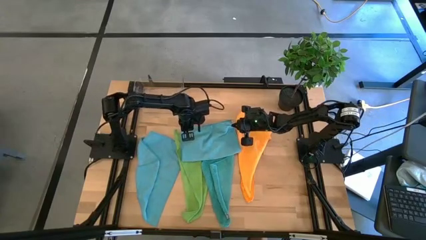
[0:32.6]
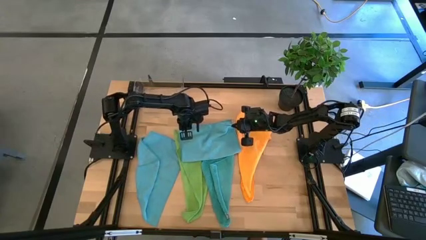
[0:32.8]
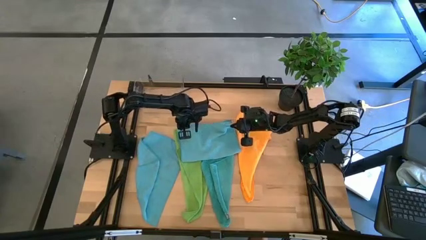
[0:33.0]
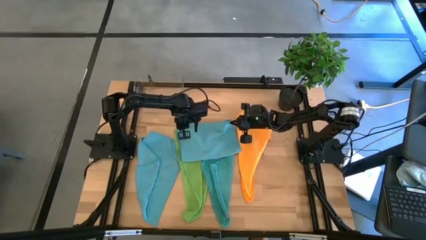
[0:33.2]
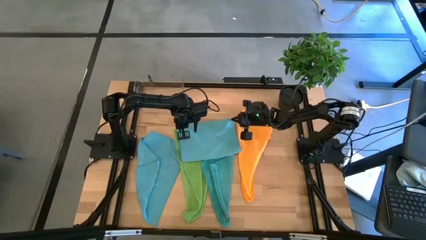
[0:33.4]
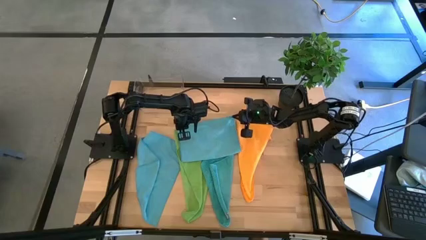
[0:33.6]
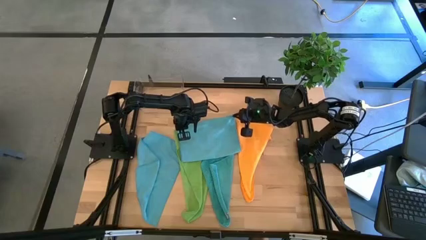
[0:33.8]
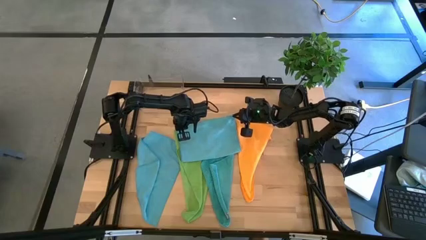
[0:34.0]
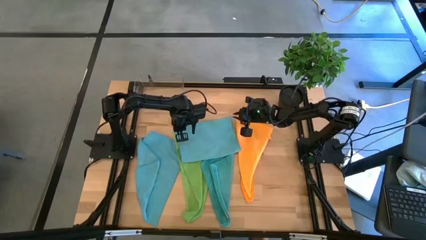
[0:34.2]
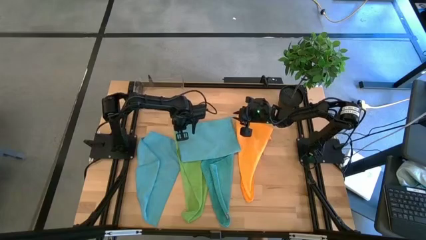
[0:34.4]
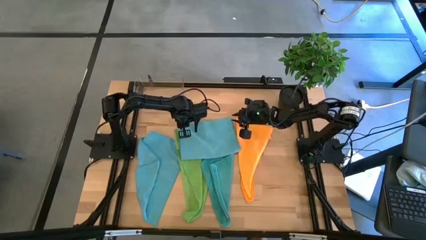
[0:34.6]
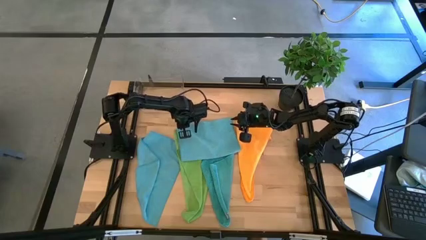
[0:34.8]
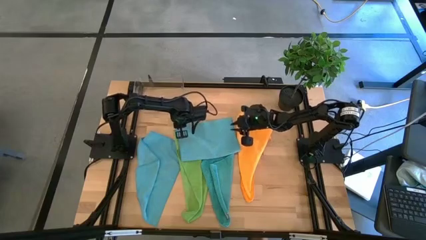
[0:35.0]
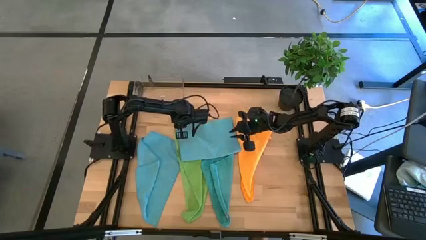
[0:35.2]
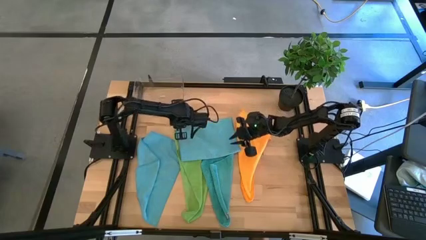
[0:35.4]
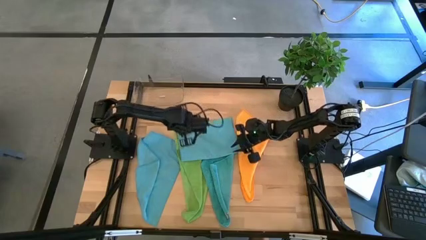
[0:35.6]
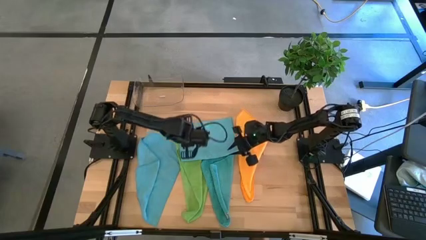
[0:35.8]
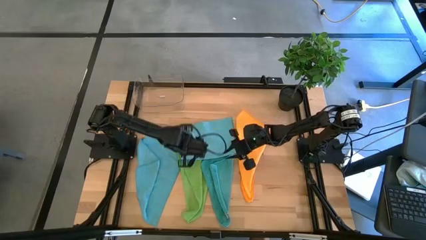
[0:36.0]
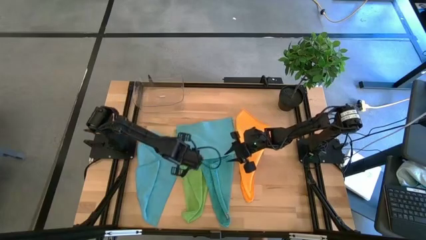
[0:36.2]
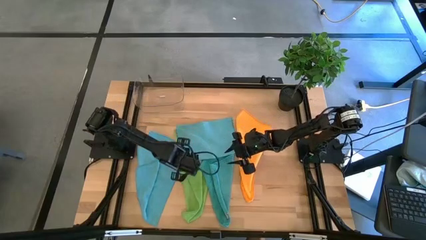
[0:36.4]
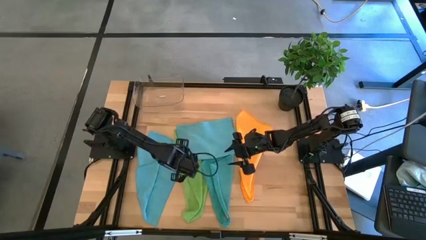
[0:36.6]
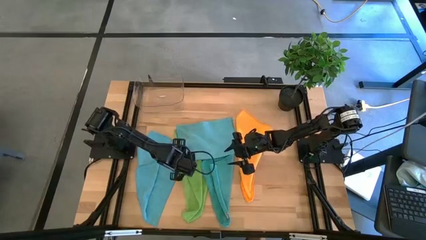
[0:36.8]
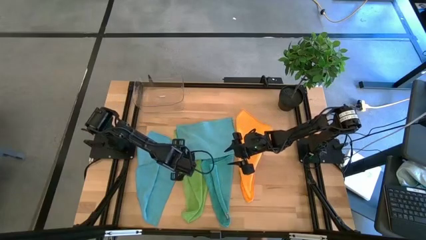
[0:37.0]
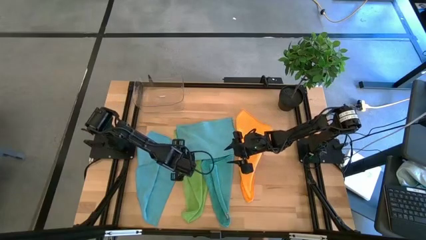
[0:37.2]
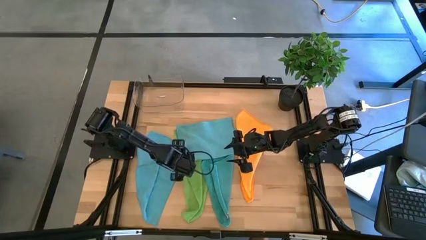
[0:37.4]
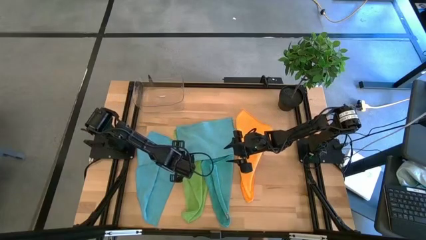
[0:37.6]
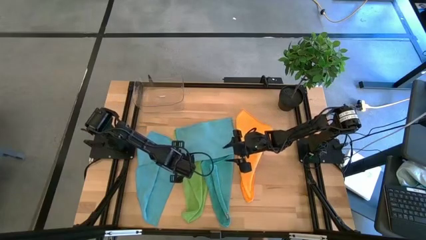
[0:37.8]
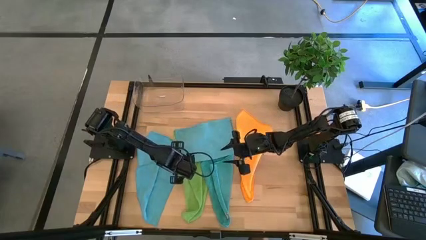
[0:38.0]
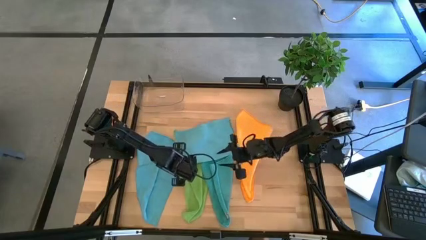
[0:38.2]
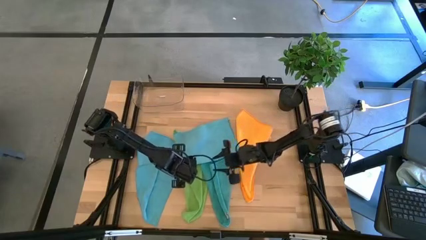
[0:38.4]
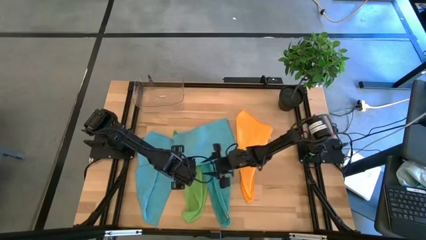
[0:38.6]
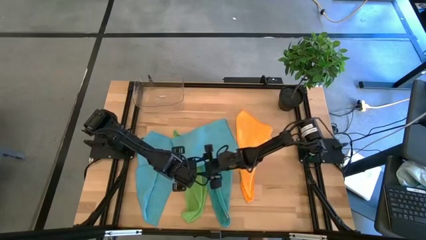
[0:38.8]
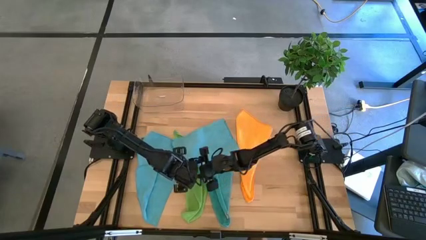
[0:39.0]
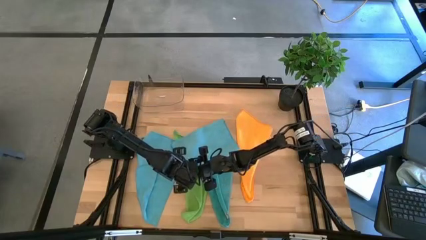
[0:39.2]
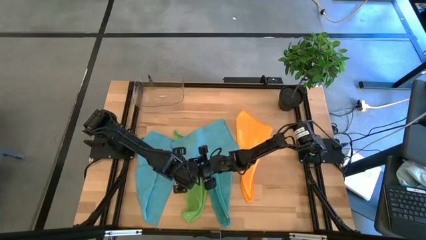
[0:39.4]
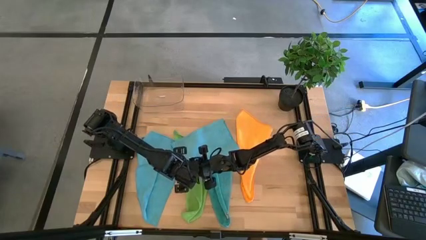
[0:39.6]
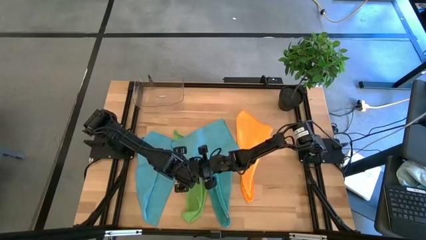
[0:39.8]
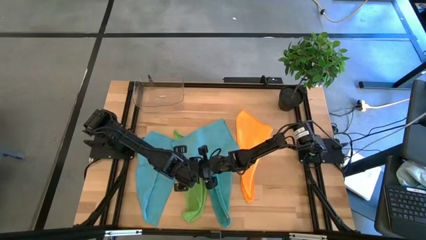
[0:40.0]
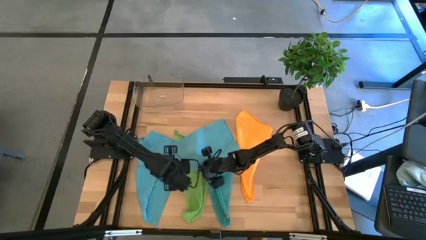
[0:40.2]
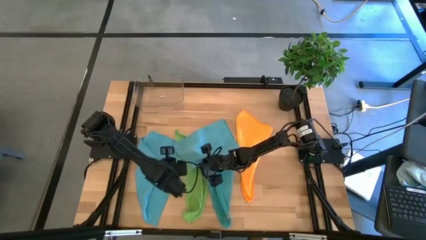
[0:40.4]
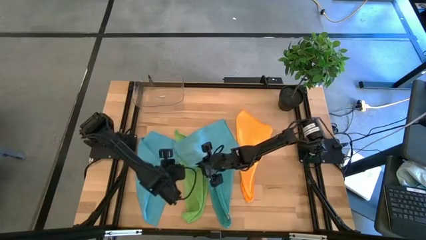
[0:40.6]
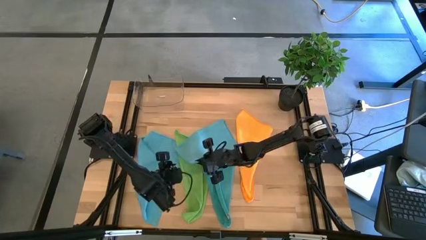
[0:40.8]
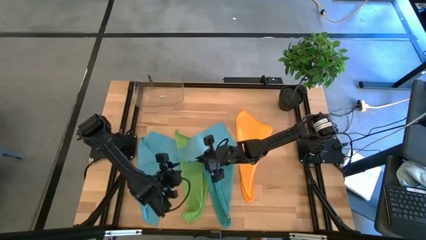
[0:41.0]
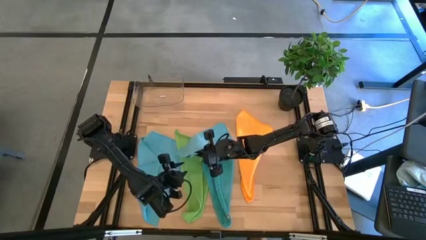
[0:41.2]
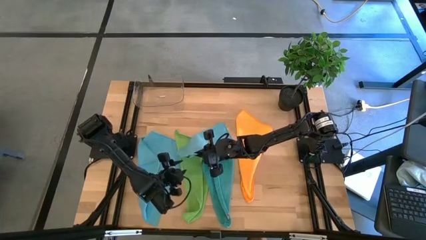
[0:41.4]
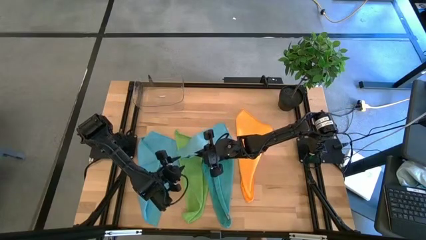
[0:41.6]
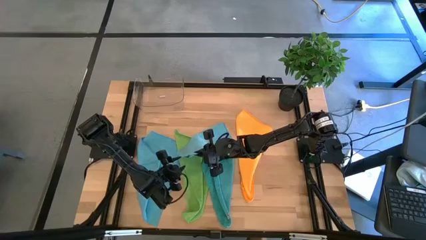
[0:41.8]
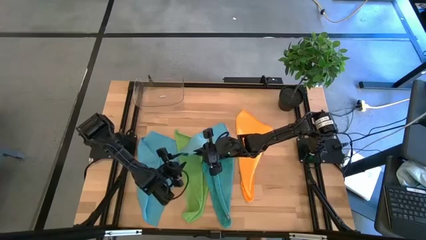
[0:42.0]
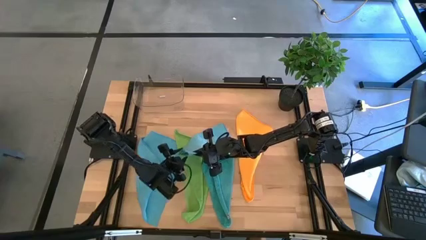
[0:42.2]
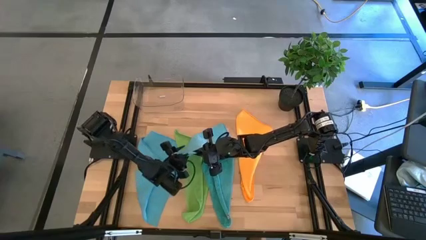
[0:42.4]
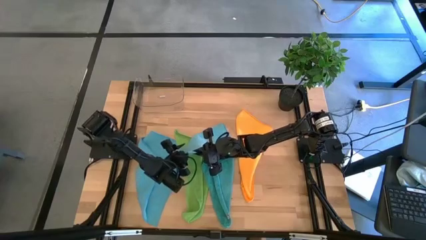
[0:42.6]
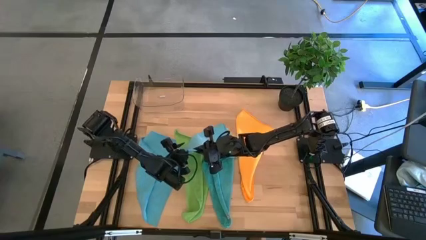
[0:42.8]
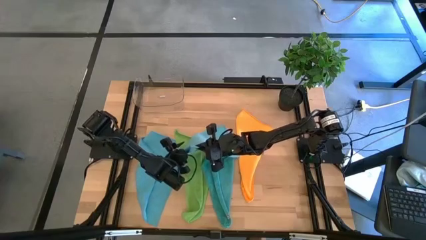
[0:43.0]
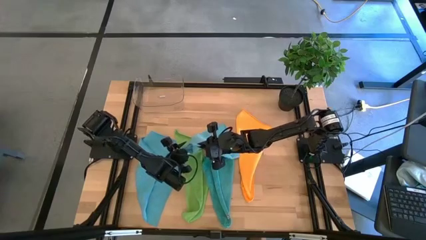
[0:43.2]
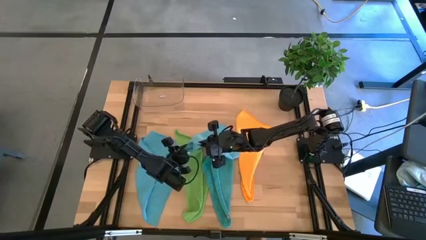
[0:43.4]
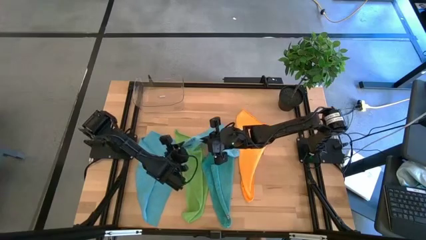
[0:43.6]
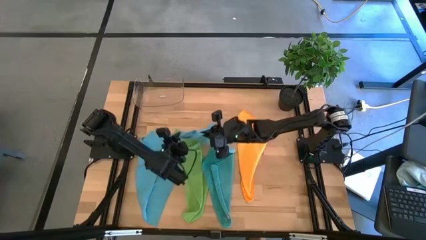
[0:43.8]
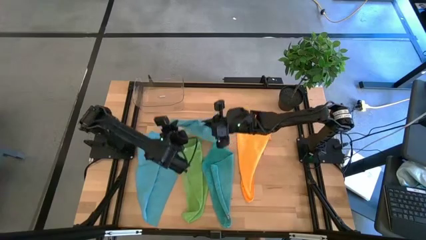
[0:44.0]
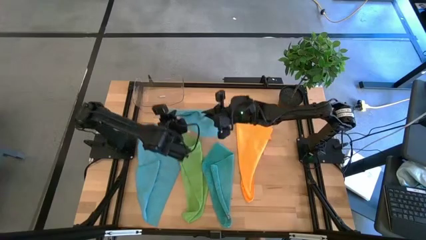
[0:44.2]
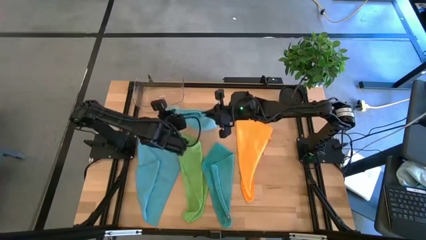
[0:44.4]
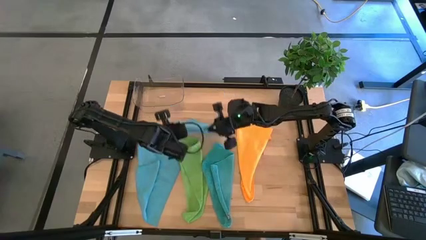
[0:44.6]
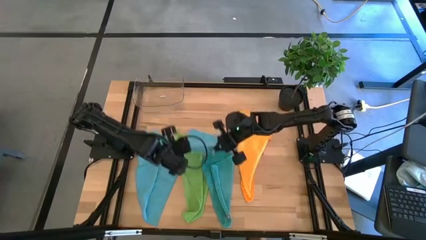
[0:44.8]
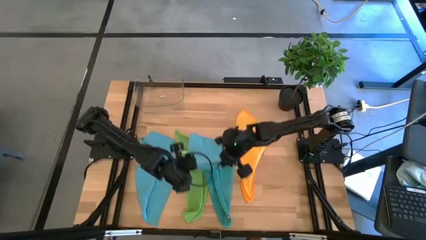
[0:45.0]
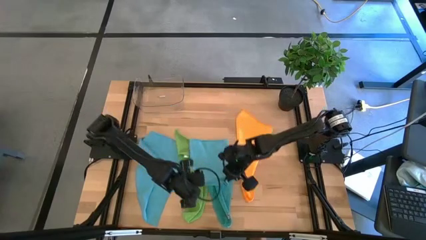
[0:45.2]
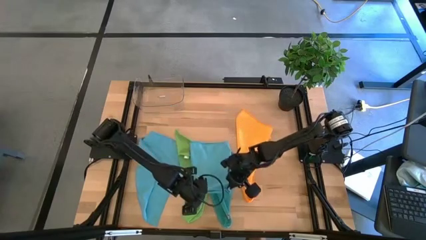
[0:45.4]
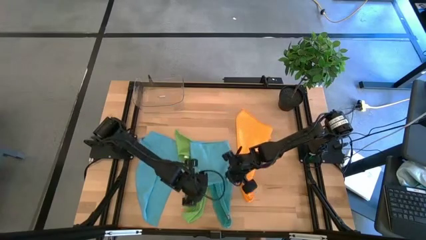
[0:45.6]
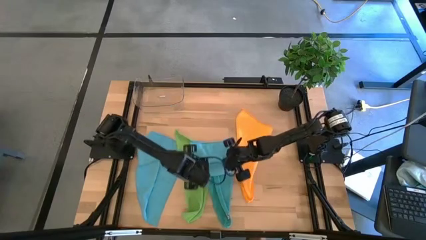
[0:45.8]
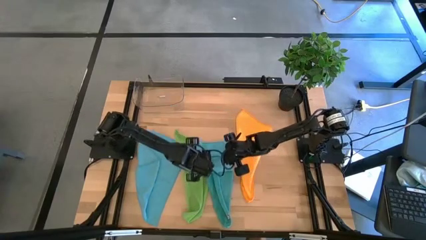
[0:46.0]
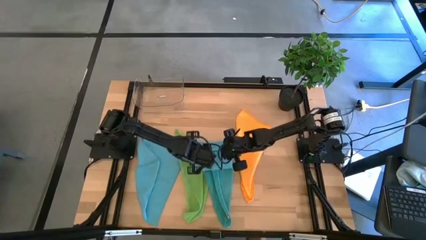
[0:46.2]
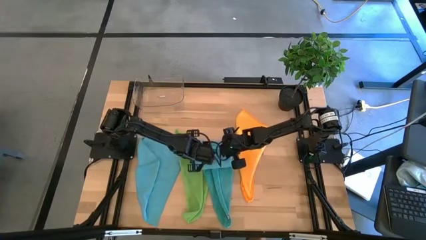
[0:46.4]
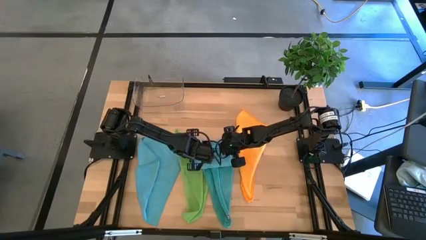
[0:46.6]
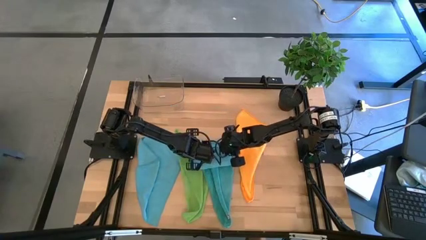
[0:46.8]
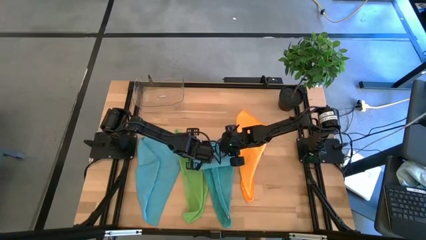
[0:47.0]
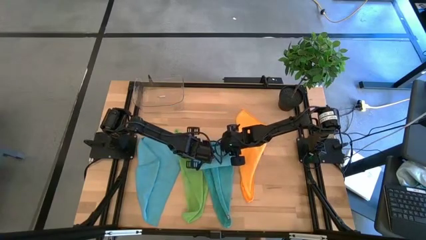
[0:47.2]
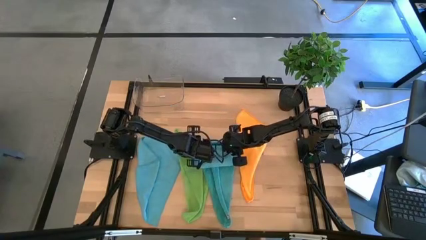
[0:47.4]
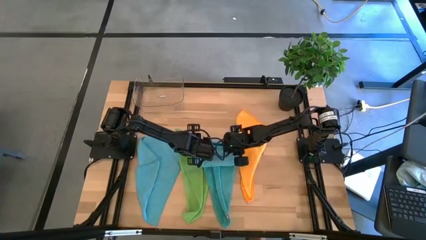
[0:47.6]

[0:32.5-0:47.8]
Task: Fold microfiber towels
Fold the light blue microfiber cloth
